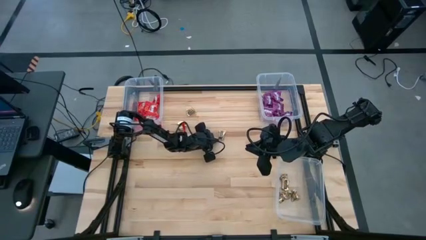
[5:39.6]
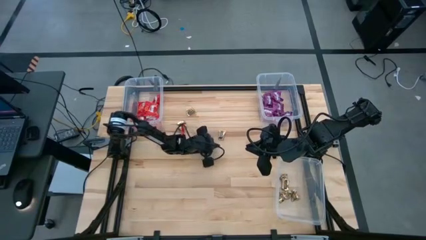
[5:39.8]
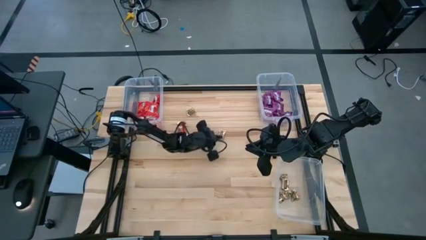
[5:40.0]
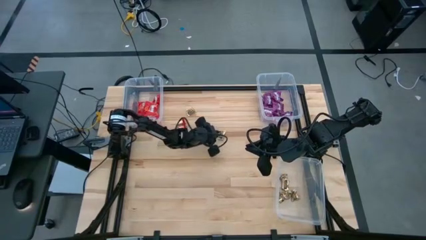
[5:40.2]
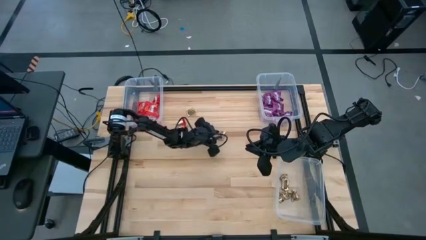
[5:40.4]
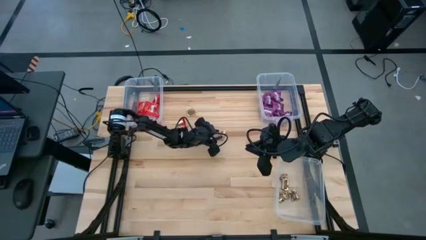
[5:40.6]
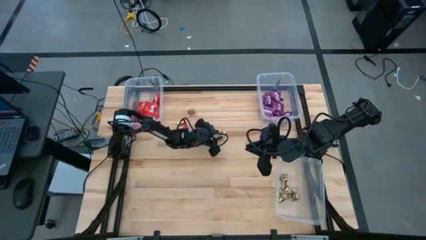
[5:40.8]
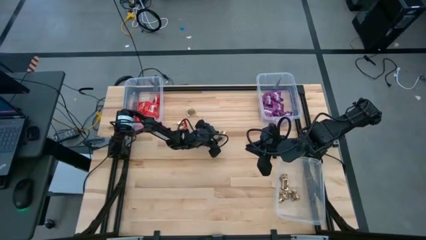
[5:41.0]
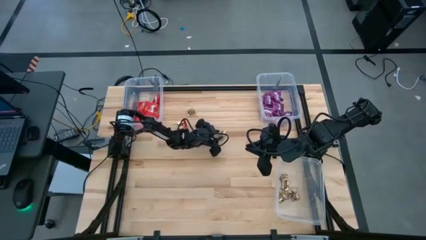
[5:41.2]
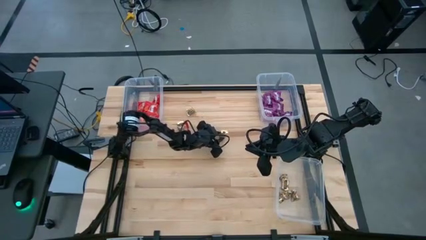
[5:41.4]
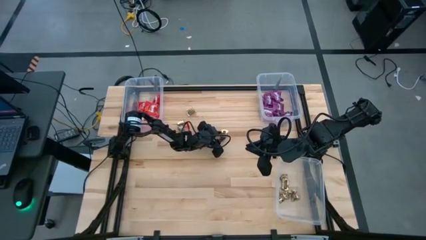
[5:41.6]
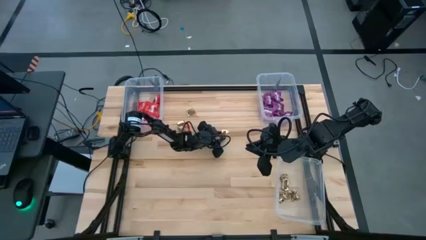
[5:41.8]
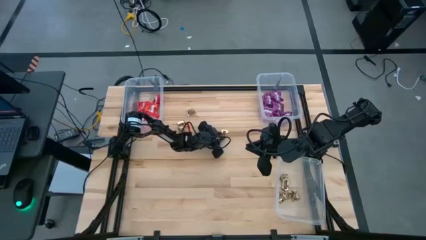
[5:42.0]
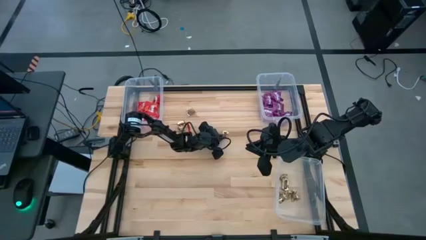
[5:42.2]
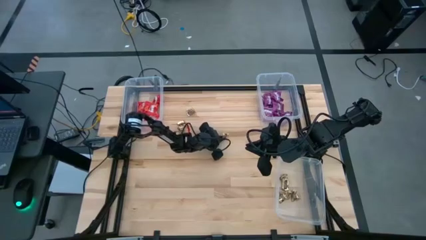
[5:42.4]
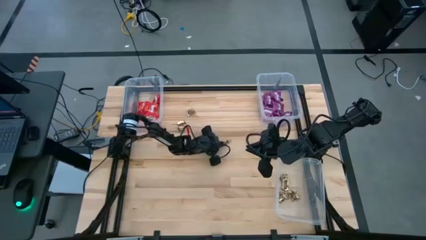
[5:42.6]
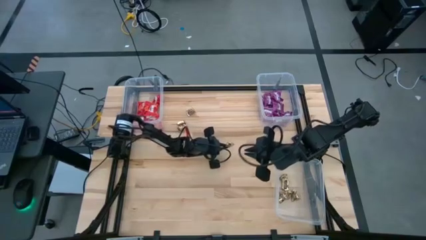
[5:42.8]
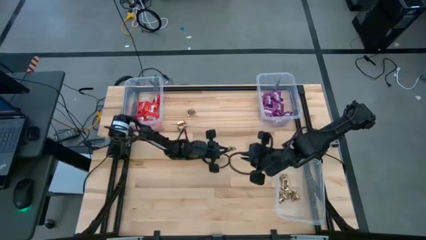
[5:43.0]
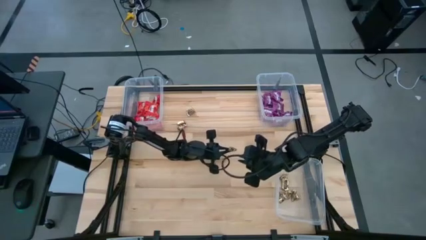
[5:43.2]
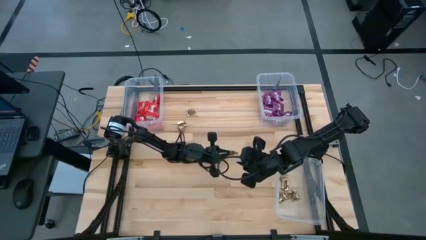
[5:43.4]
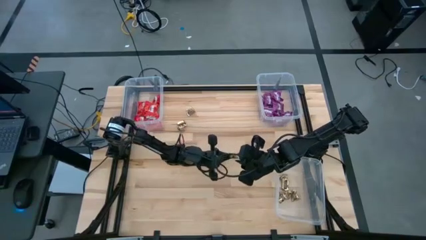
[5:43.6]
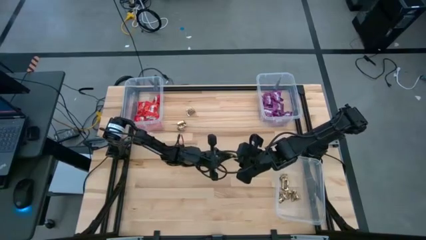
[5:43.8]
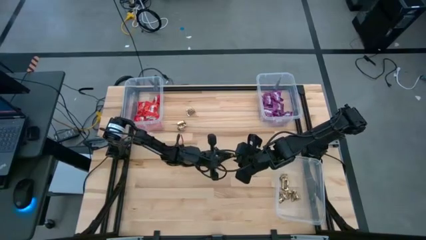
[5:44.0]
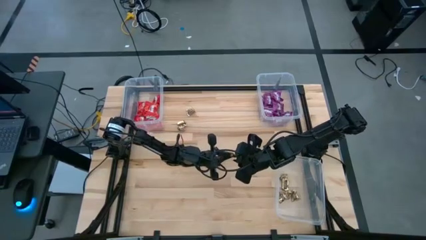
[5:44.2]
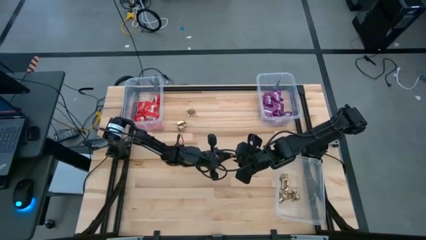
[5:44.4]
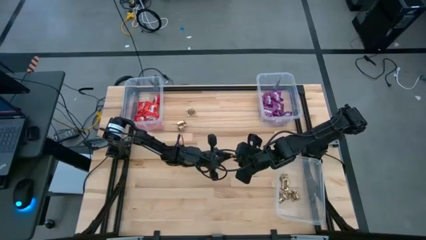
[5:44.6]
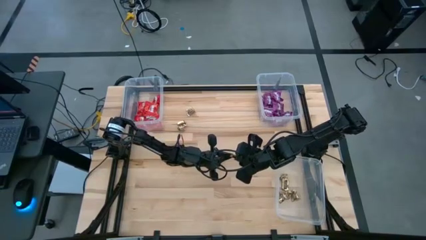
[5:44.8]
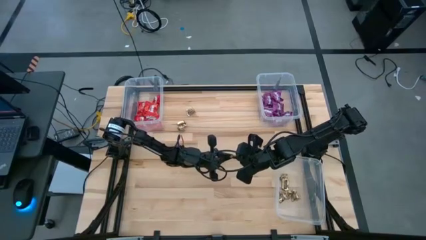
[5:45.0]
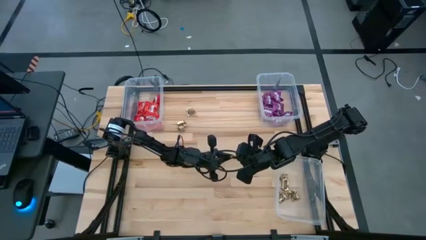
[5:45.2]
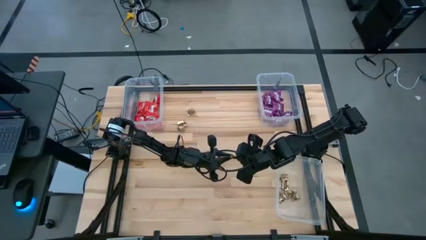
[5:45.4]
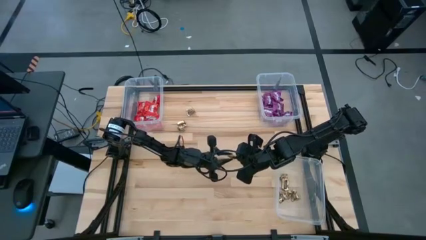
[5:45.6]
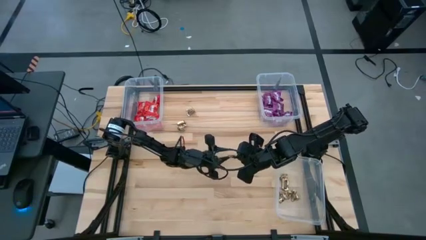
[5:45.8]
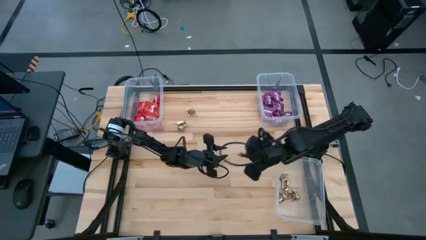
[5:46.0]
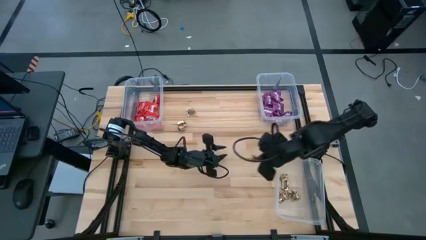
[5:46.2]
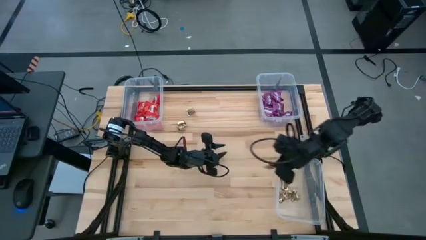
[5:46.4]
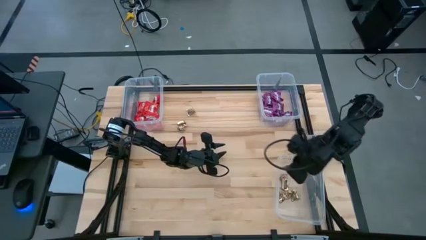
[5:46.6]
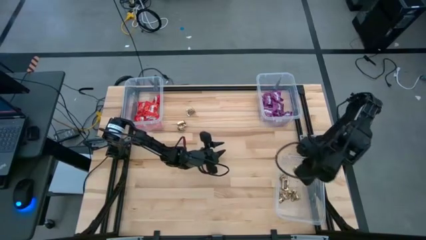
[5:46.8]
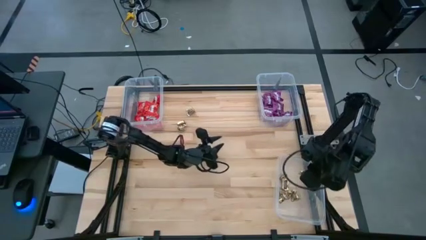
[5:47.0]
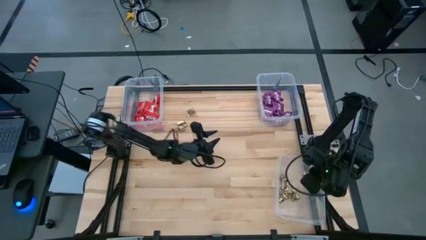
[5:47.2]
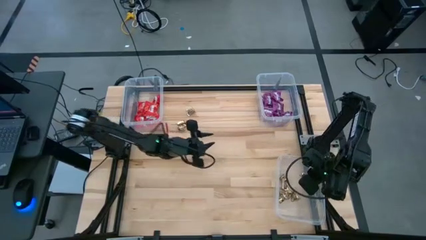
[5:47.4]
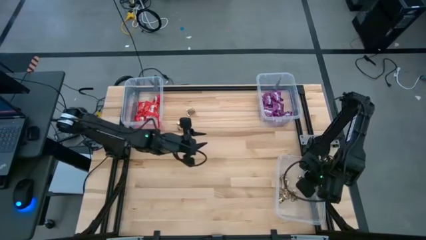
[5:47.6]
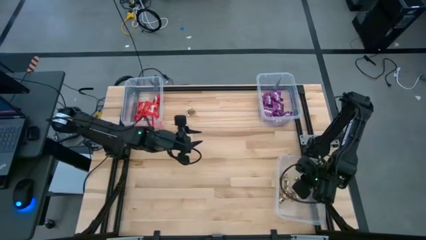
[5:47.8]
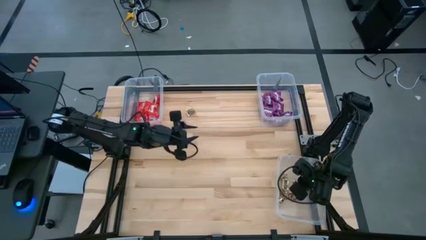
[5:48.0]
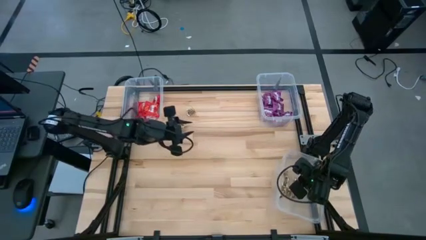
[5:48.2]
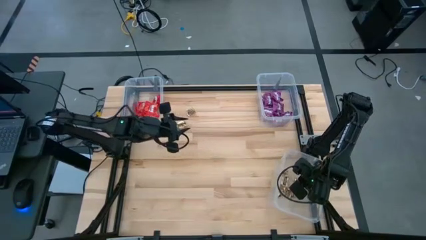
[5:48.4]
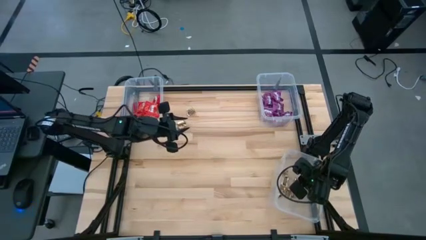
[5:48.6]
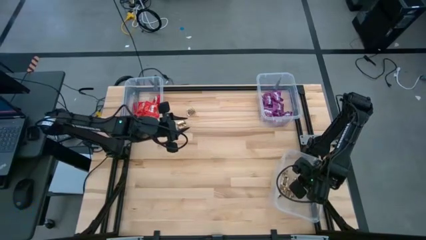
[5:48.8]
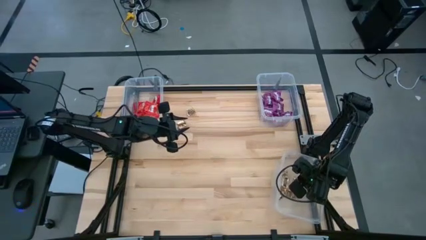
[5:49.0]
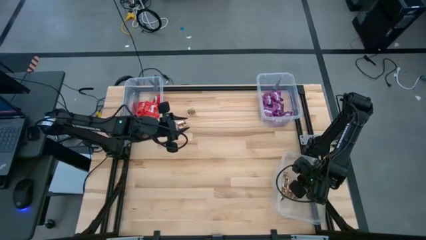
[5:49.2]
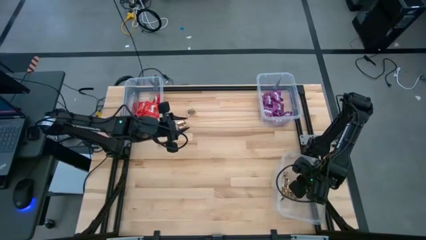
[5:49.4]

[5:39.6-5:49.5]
Task: Sort candy
Put the yellow candy into the bottom right transparent bin

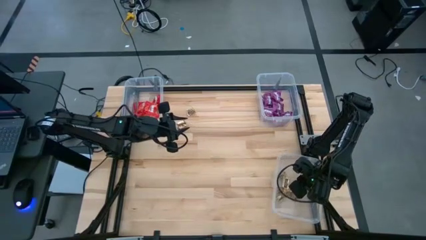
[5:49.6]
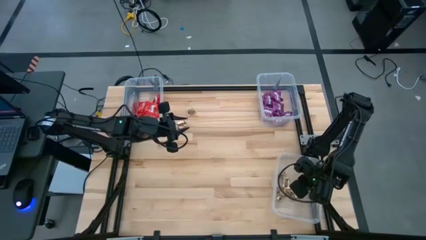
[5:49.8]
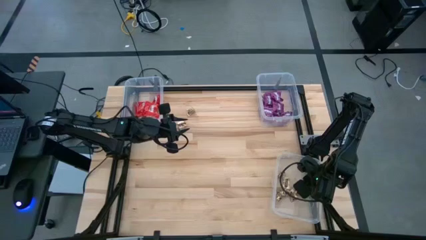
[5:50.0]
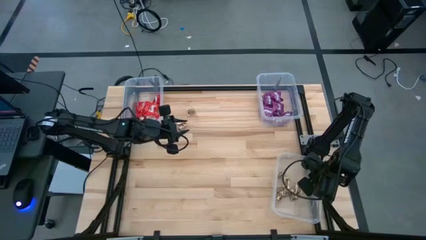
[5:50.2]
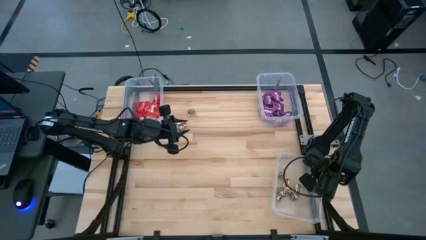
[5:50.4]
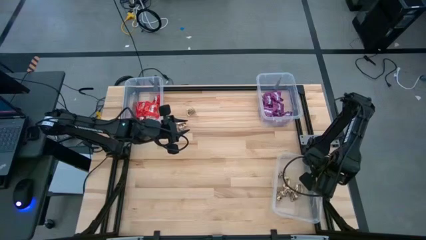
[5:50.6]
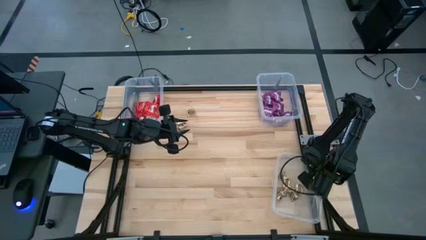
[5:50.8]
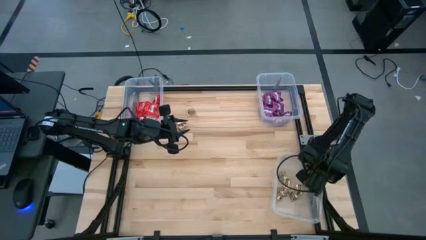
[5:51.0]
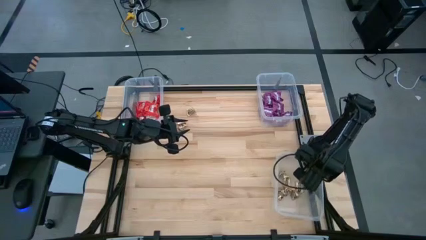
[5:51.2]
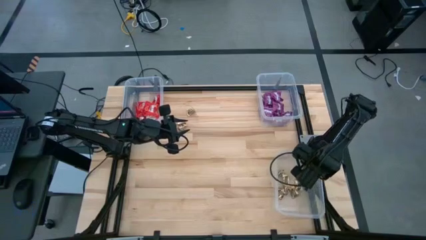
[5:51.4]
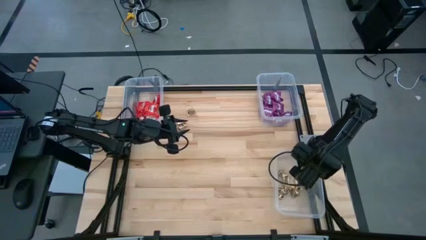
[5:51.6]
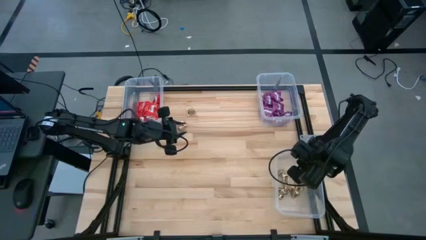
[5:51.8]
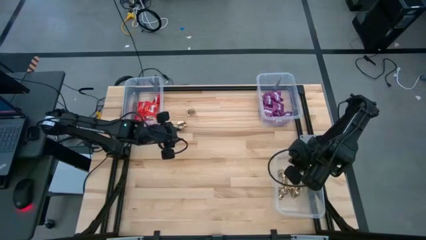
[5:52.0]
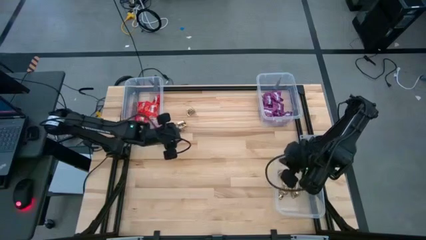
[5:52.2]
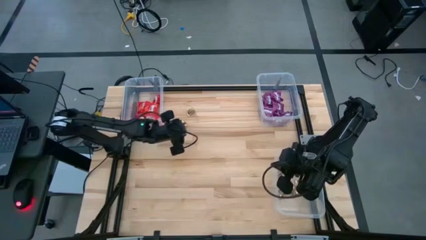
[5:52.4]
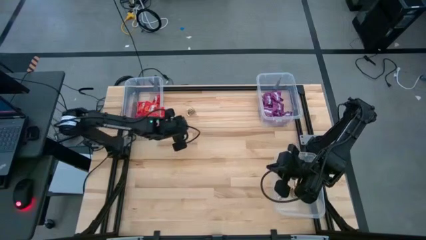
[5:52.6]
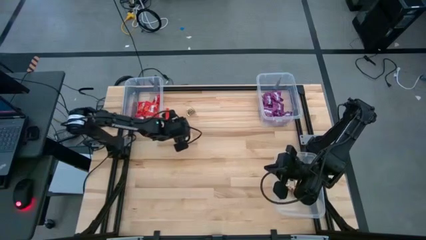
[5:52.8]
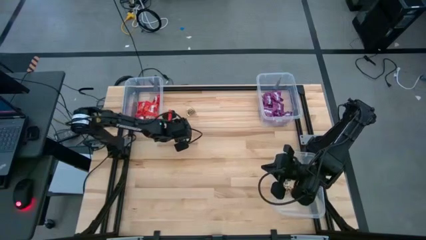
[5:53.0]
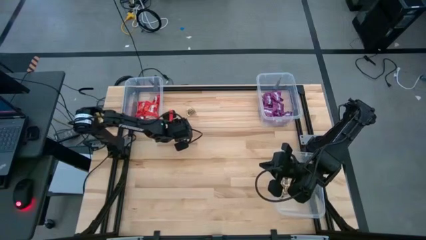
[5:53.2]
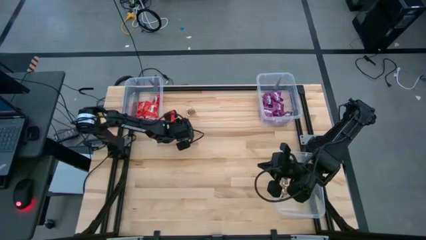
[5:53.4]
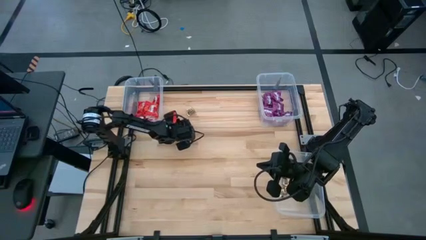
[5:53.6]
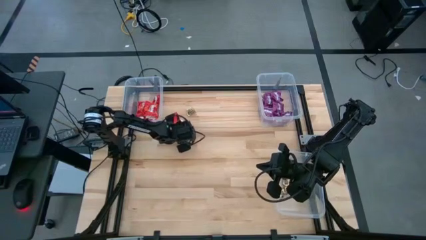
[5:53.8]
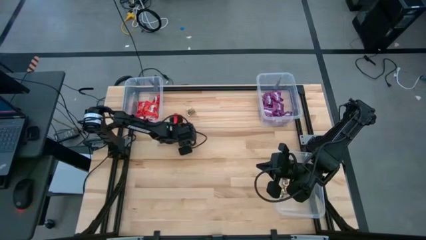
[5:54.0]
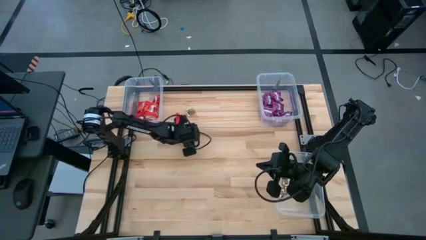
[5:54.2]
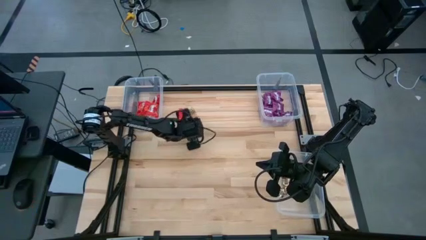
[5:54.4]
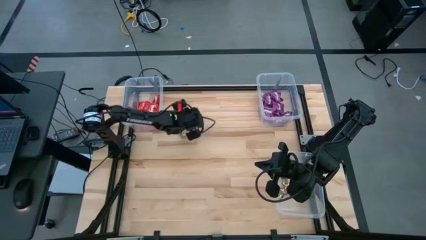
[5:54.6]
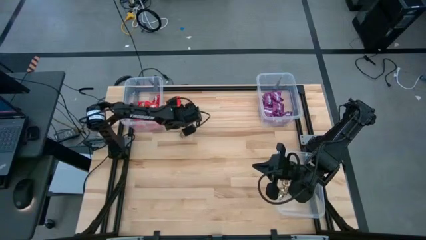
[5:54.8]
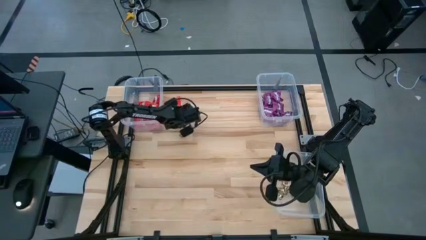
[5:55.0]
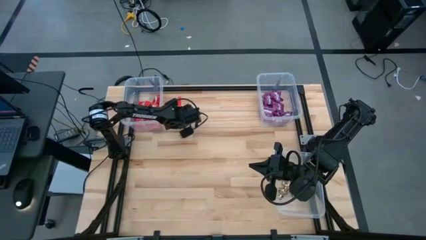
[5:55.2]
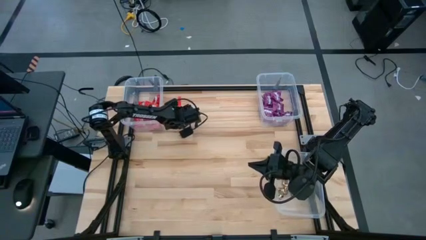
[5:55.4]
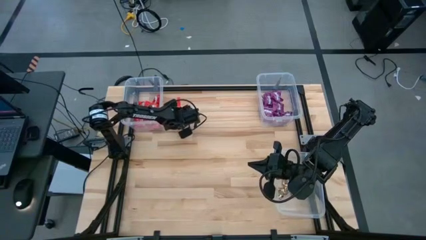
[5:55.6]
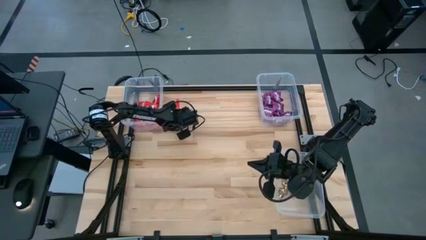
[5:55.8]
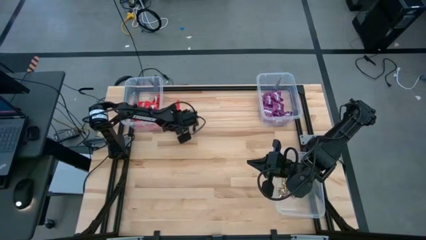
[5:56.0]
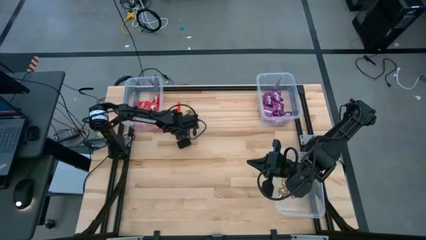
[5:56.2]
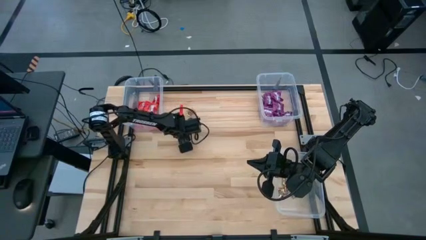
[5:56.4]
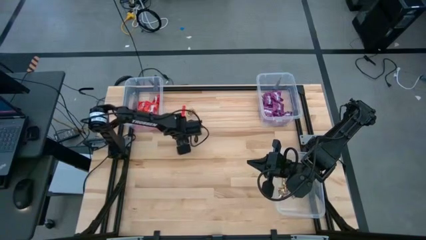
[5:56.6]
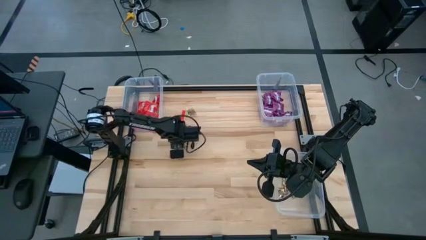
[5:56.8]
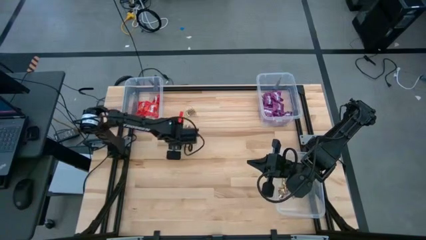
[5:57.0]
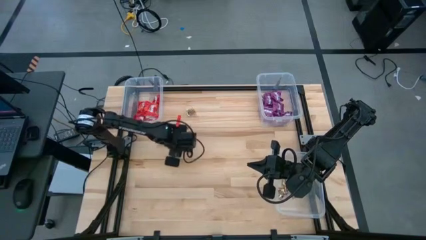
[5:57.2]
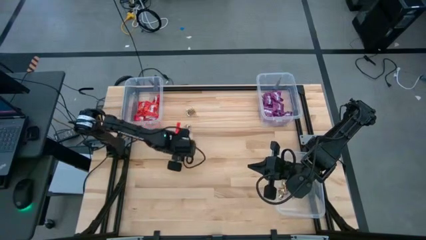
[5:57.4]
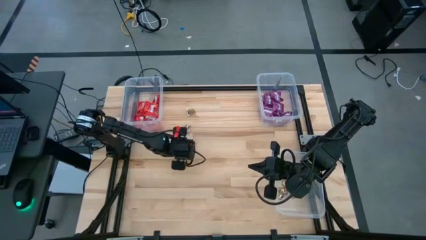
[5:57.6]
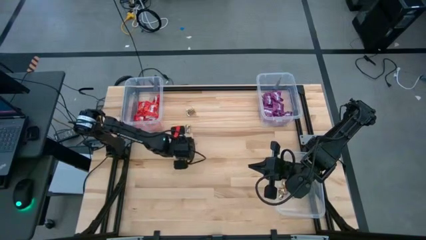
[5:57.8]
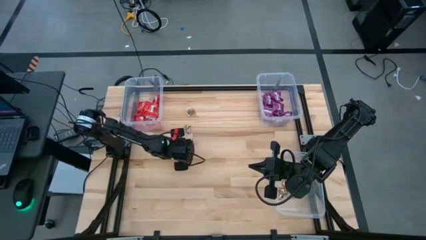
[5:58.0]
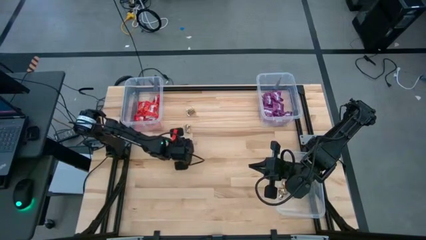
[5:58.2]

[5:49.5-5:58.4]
Put the yellow candy into the bottom right transparent bin
